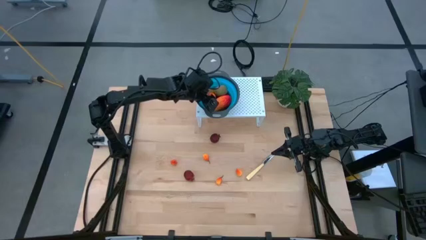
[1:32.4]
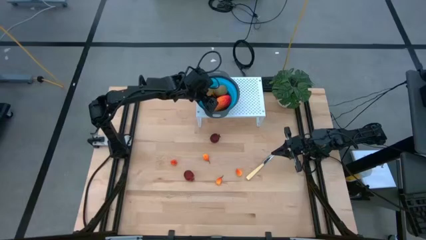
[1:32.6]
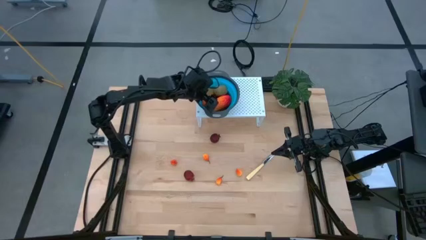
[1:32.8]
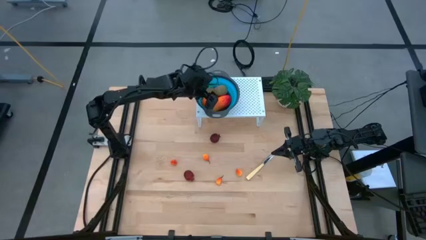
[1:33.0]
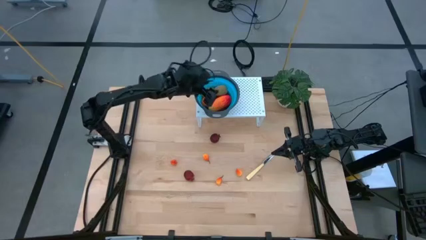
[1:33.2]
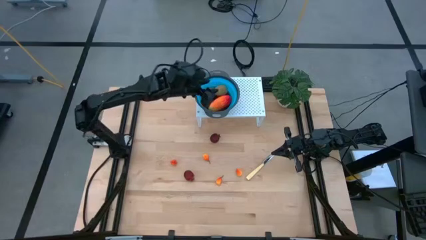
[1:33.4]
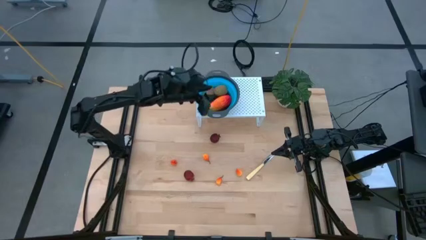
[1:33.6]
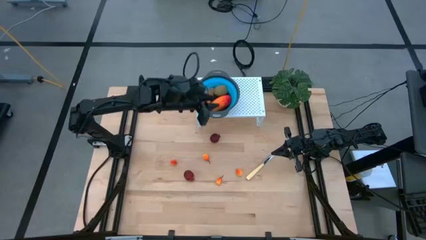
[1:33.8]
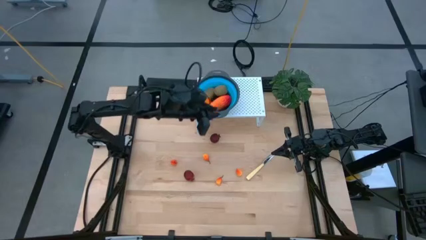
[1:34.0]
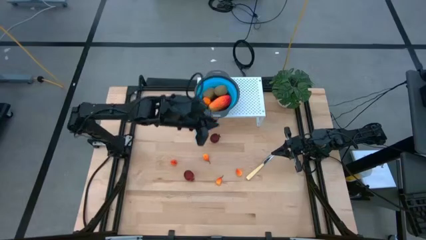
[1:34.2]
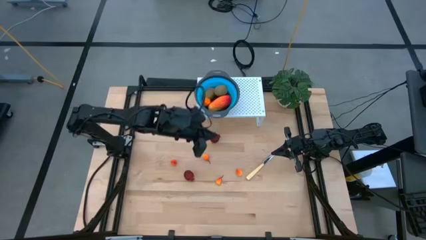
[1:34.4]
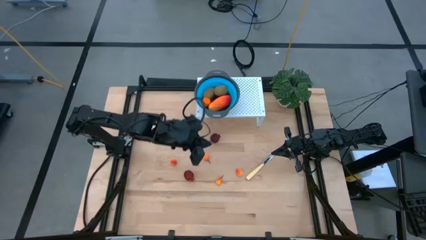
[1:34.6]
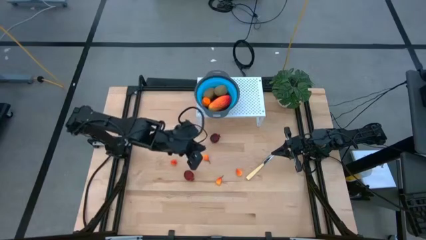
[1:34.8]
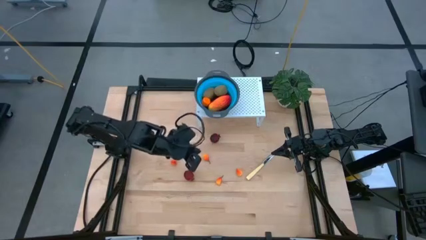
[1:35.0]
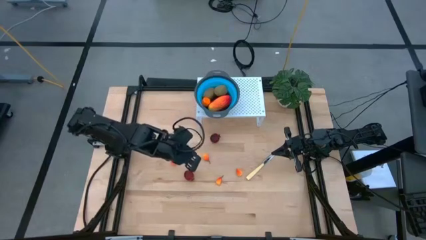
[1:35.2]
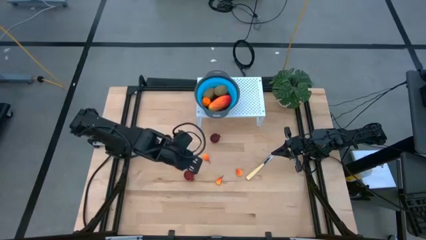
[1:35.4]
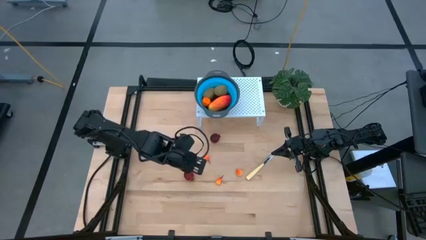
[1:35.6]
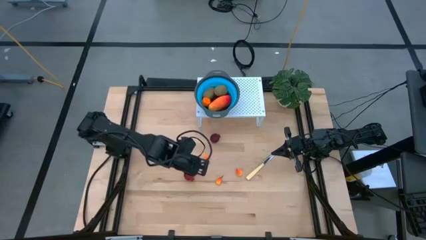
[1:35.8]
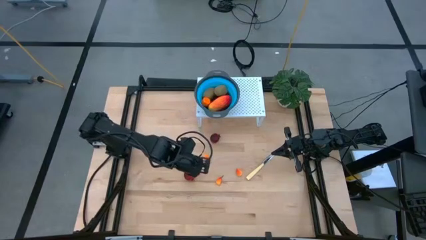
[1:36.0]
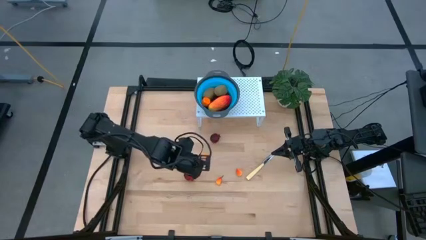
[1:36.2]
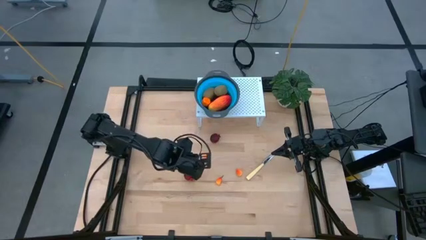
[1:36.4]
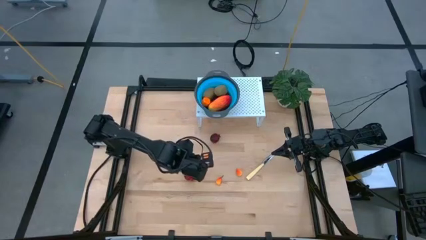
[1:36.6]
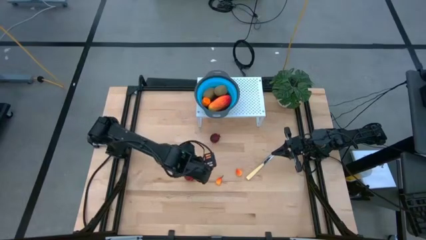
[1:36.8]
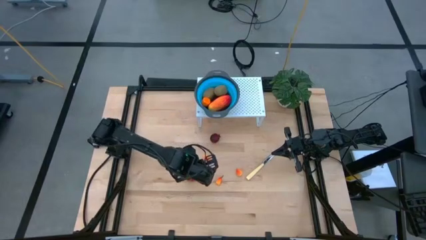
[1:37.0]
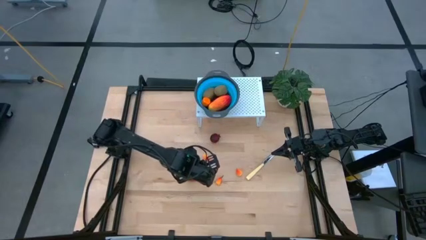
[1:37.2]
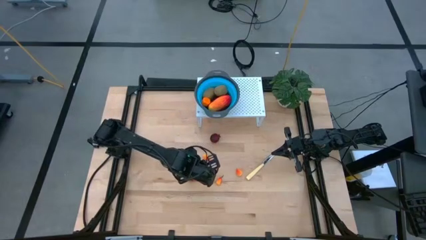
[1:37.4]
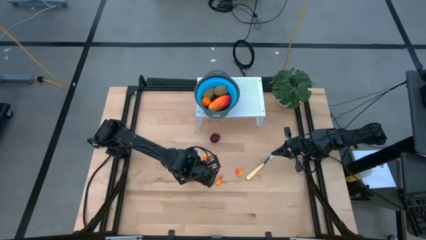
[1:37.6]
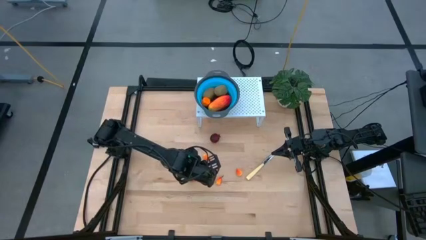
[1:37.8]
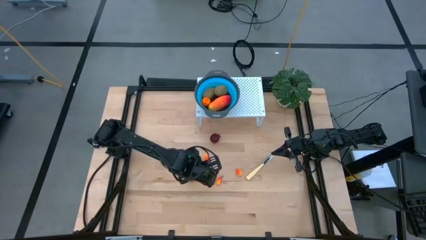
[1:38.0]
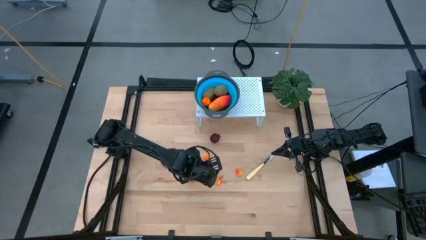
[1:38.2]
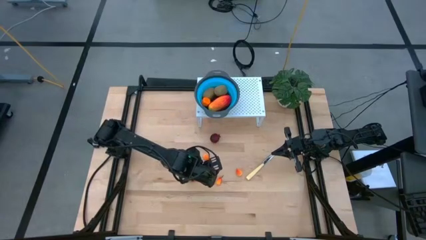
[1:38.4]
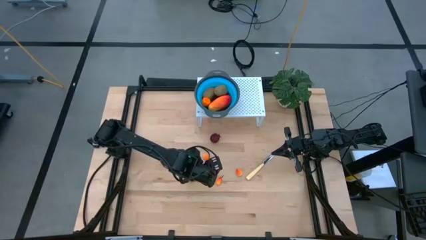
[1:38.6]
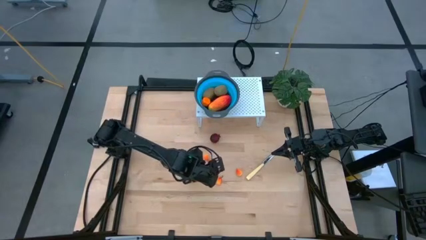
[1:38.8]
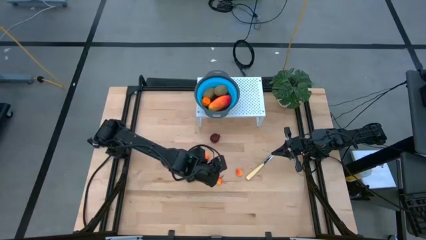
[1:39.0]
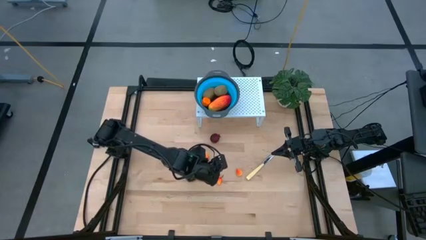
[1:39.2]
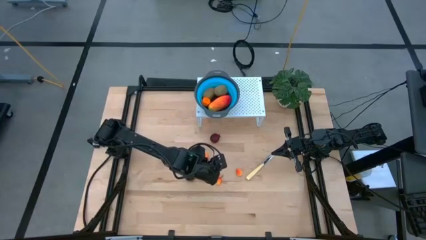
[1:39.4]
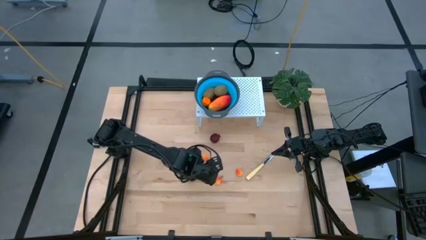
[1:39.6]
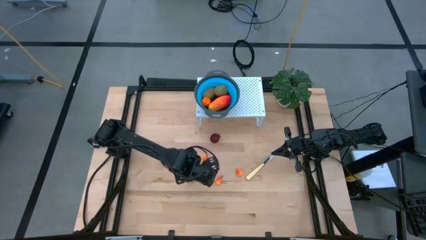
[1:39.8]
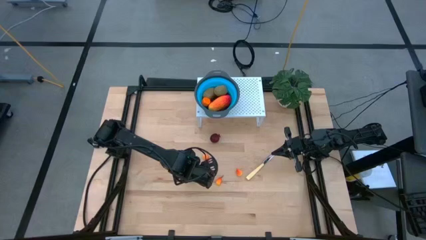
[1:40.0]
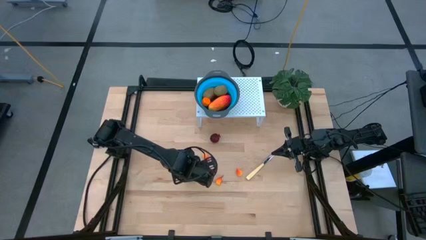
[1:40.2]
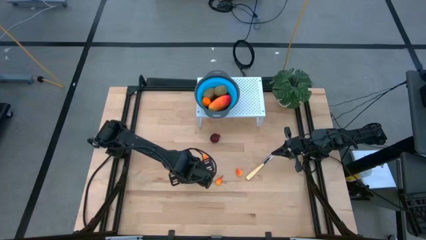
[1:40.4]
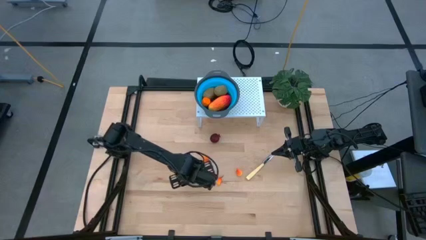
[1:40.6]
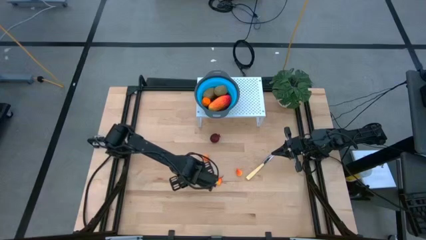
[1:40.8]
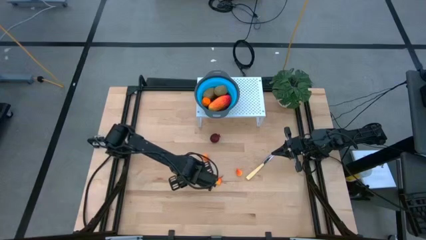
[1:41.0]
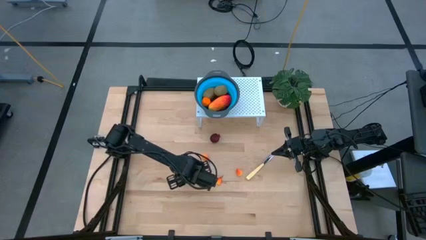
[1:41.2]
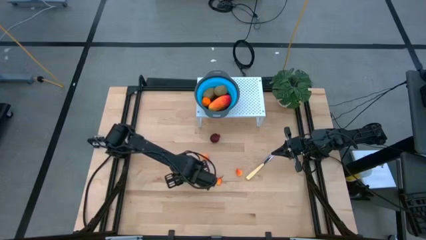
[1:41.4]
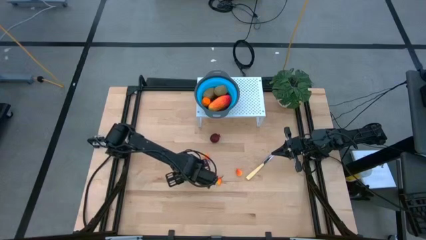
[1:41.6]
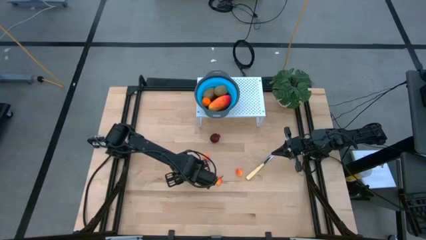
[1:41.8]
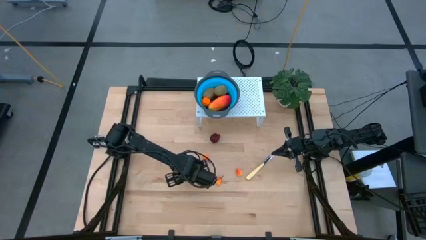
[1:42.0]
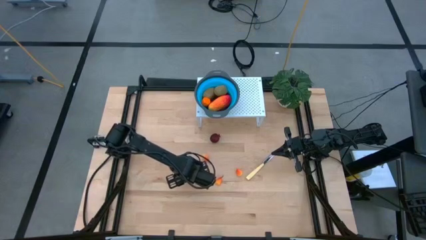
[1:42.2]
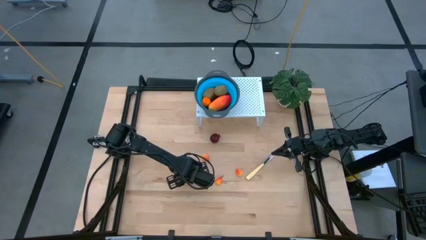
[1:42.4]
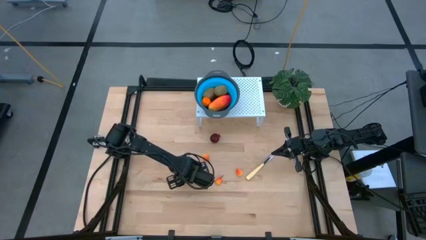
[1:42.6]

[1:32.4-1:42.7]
Task: Pick & Place Fruit
Put the bottom pomegranate into the blue strainer bowl on the shelf
